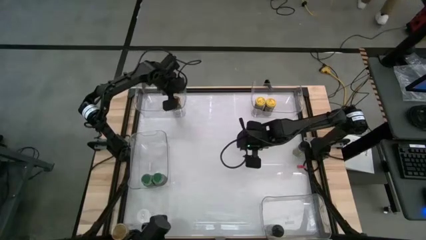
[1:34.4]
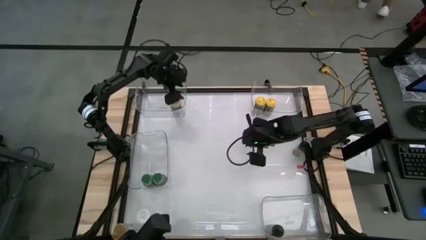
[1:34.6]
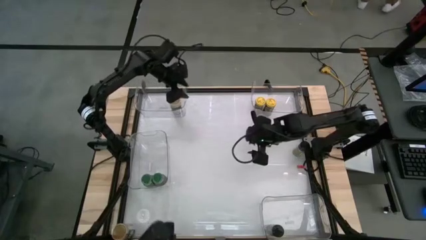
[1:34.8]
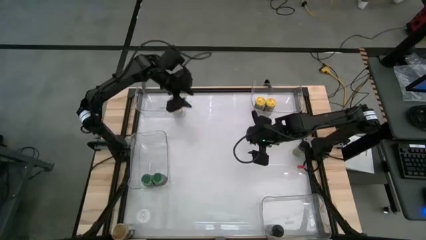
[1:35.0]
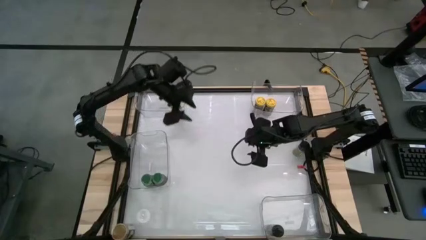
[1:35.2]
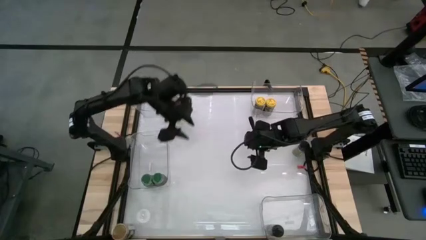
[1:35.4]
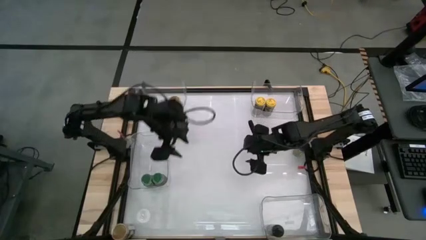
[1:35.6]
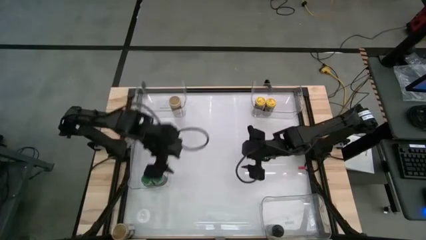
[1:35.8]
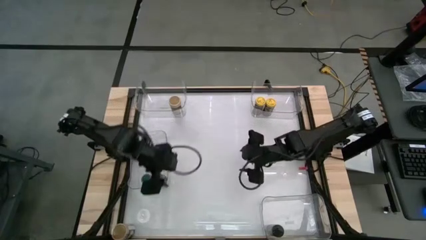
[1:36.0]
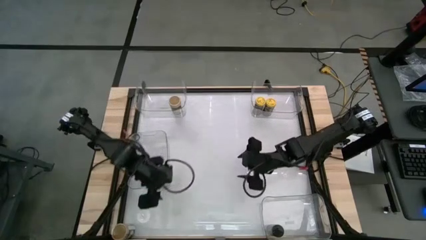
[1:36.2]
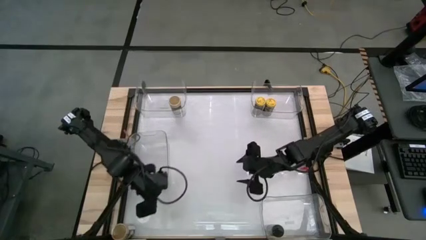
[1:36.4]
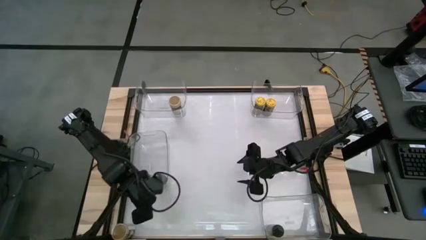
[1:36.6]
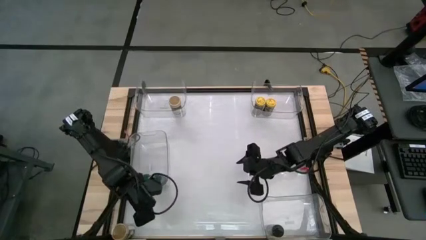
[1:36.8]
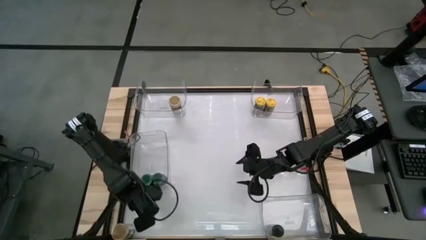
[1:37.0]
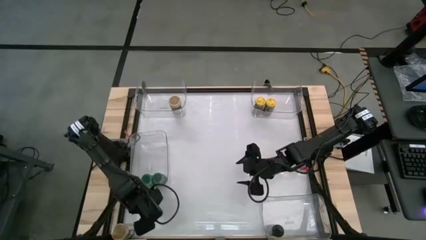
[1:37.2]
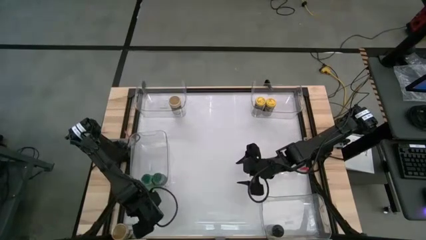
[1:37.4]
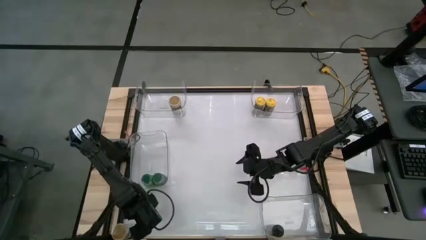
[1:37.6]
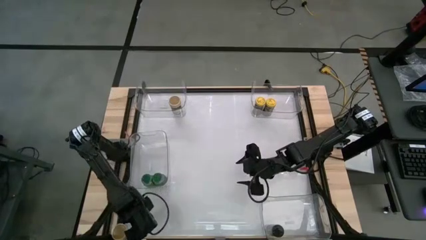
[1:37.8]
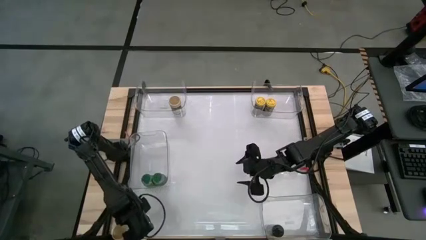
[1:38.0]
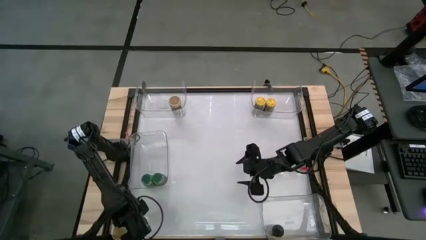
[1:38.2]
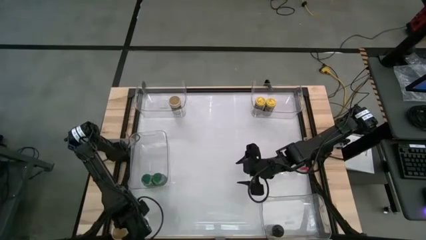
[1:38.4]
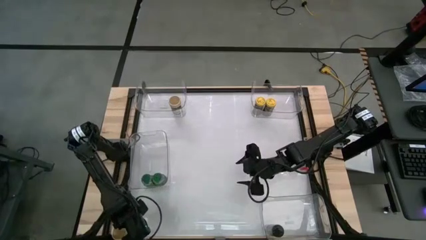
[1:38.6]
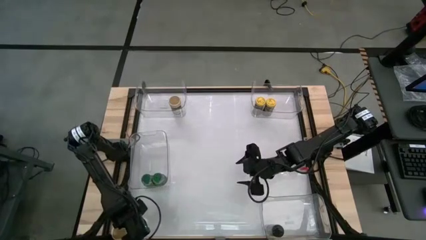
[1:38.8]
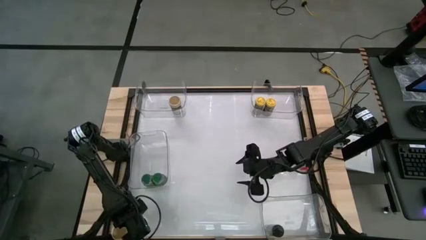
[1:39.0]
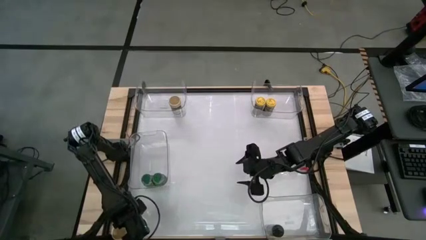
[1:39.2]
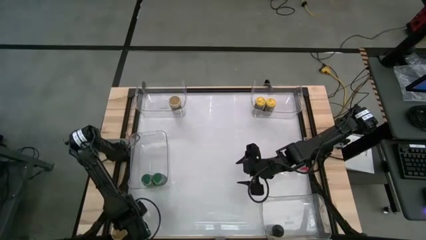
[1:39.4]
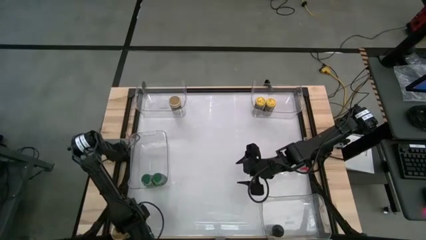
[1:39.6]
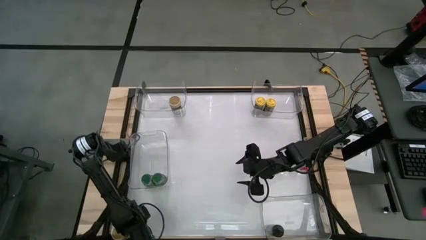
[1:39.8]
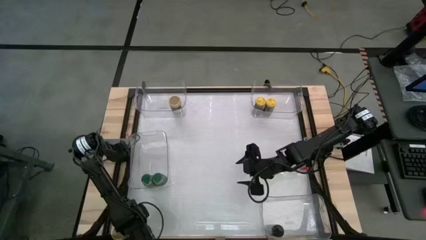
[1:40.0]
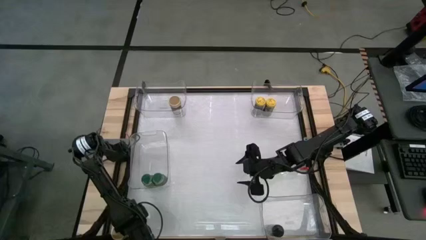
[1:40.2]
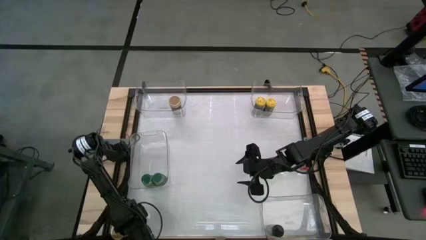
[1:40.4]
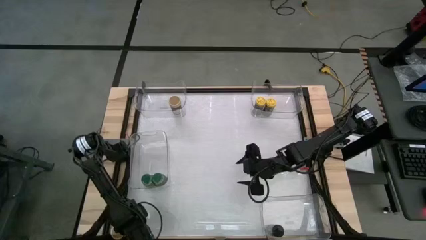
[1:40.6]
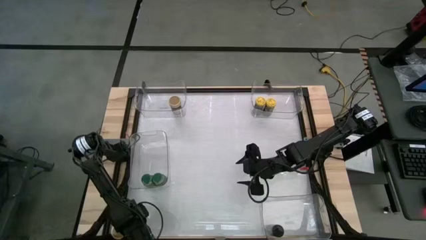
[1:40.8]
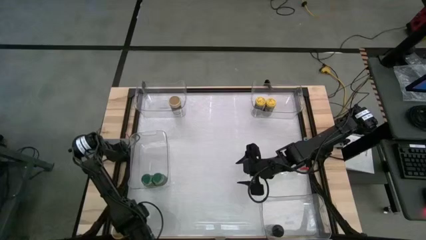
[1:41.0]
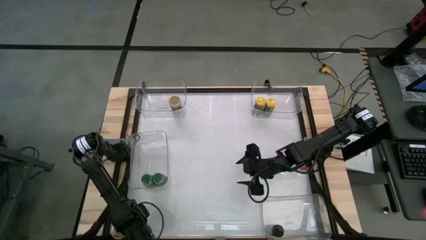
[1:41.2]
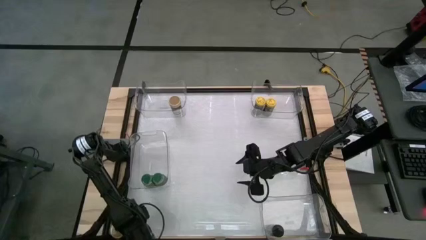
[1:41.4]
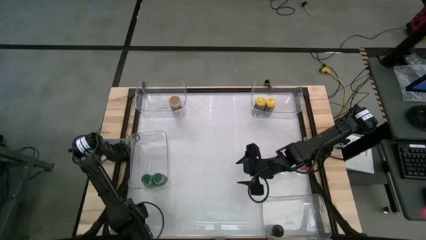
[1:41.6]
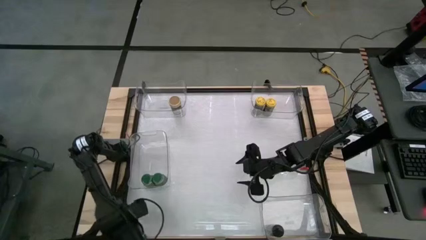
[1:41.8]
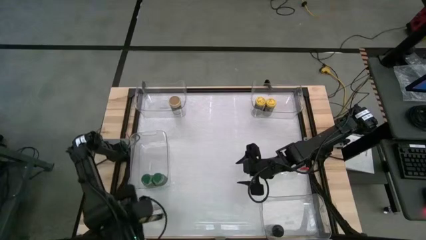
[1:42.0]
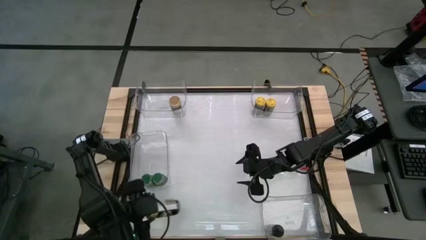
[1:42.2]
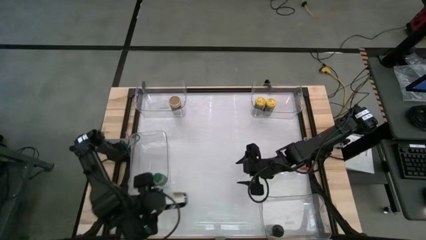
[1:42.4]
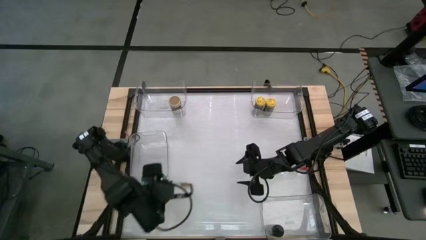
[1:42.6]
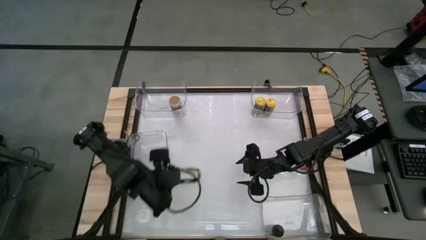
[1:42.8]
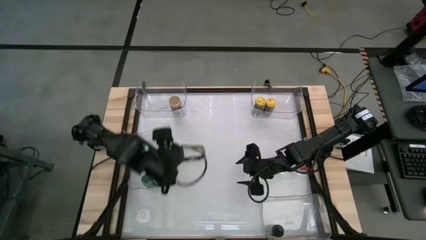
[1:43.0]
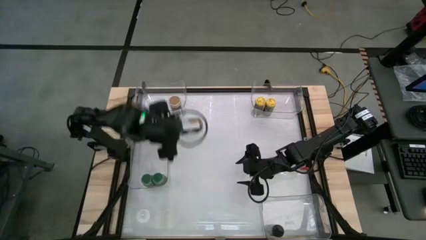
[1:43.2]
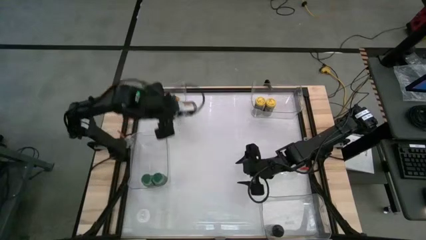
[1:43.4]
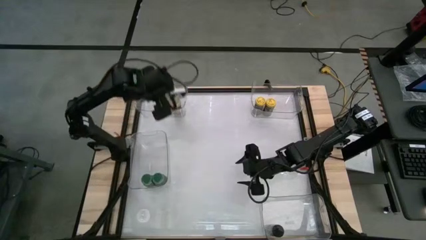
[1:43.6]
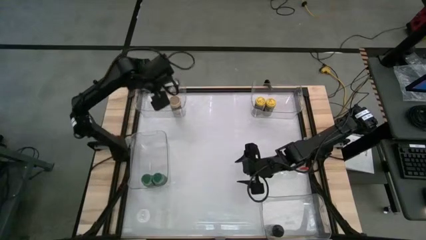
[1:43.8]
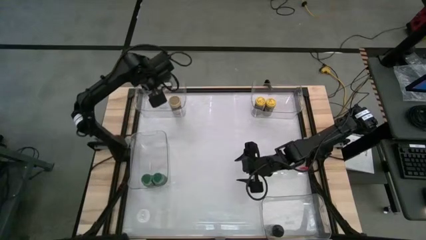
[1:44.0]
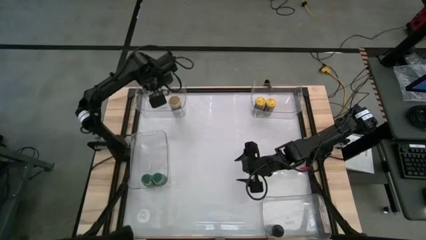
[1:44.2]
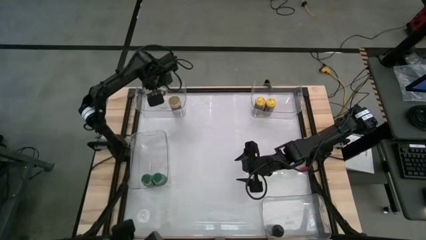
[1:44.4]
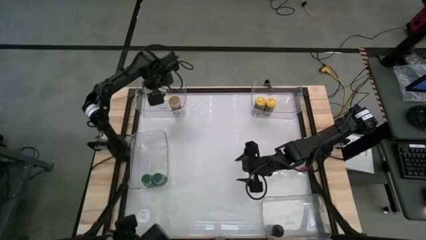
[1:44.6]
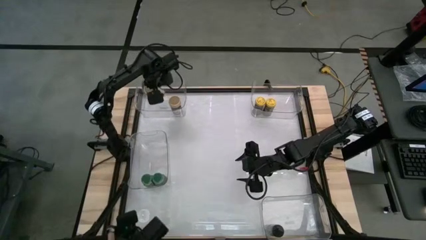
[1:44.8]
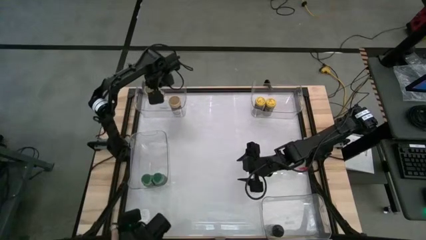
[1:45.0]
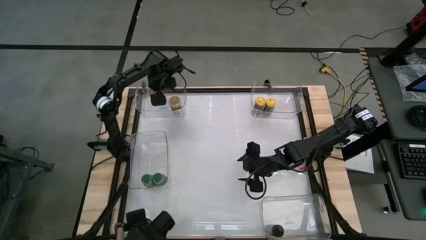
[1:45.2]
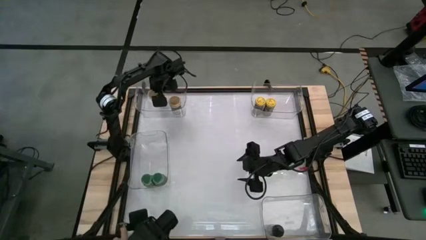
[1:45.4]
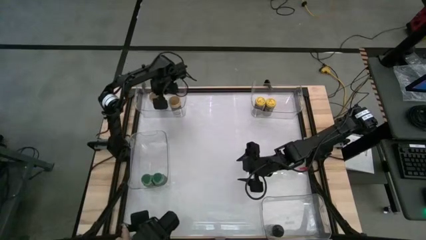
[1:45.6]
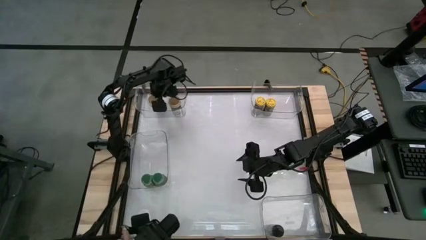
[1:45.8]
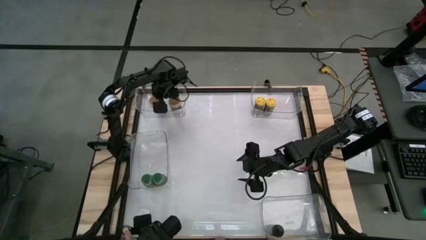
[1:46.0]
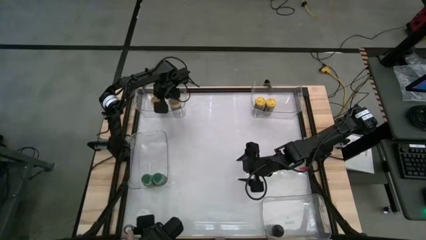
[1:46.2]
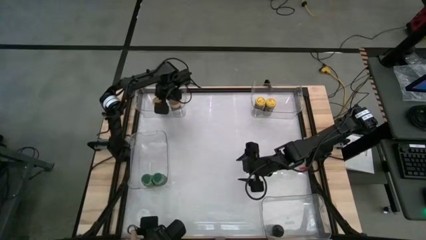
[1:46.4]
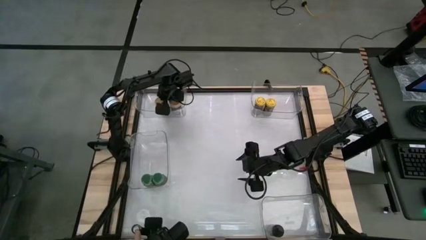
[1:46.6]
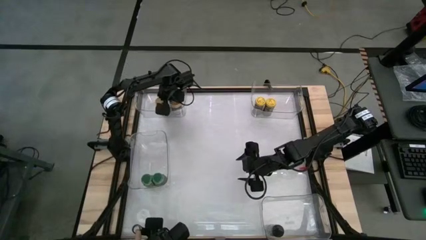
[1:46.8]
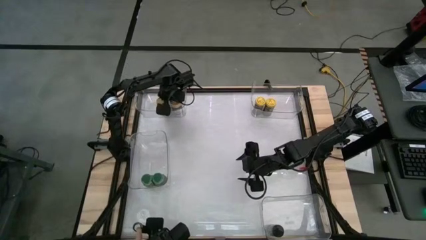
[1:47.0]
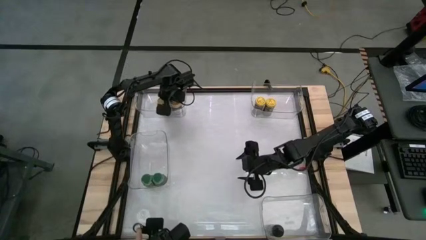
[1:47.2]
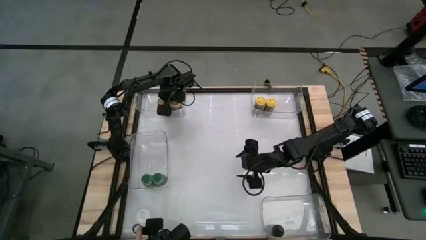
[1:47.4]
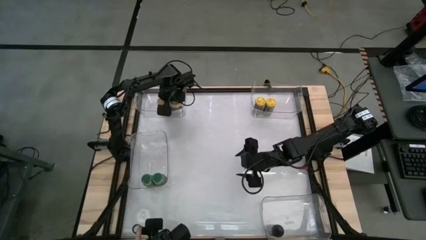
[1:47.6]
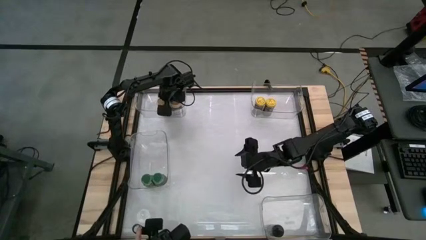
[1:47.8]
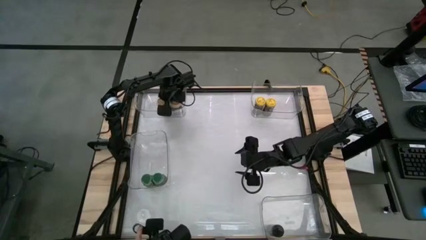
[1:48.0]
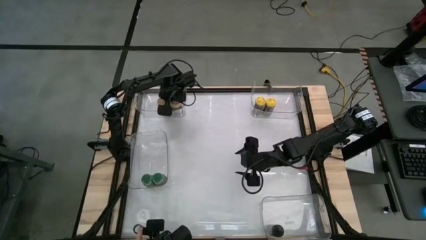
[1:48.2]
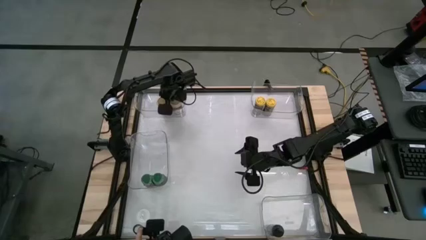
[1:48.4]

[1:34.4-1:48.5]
Task: Sort spices by type
Put the gold seasoning bottle into the top left transparent bin

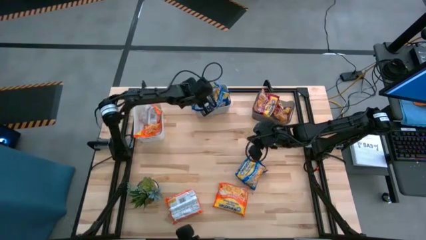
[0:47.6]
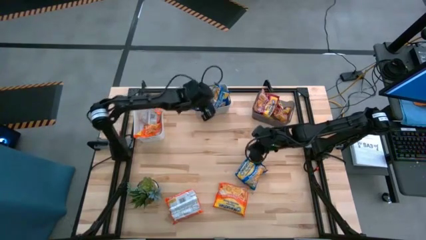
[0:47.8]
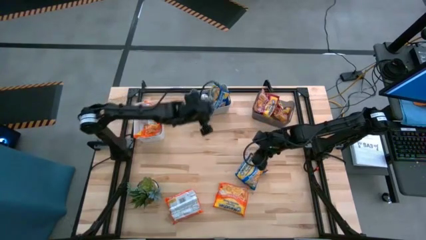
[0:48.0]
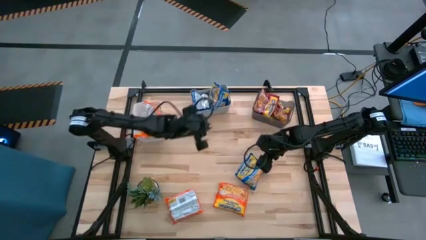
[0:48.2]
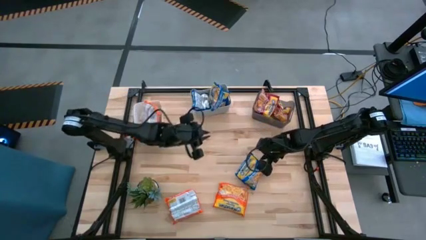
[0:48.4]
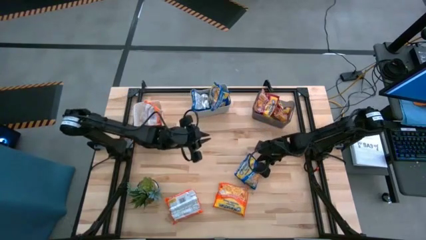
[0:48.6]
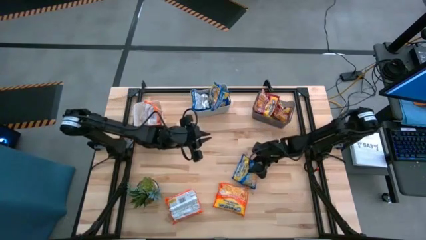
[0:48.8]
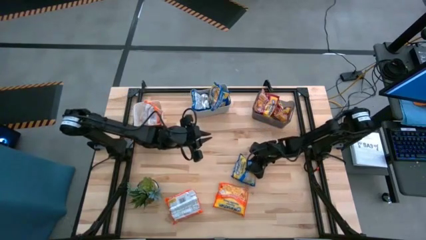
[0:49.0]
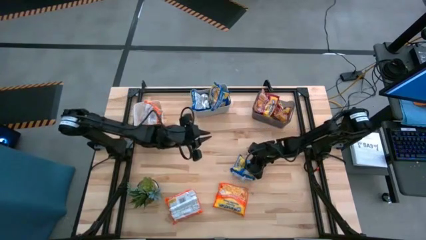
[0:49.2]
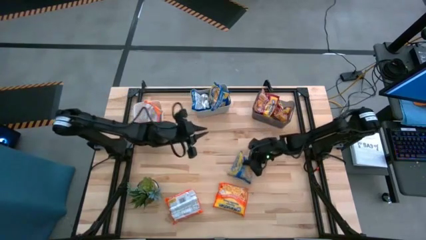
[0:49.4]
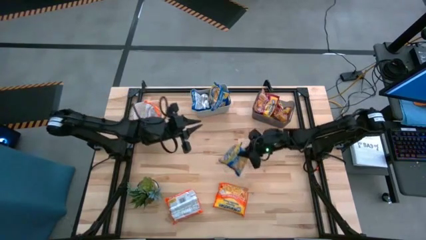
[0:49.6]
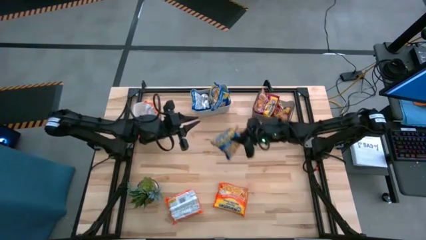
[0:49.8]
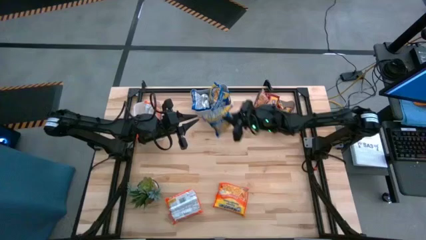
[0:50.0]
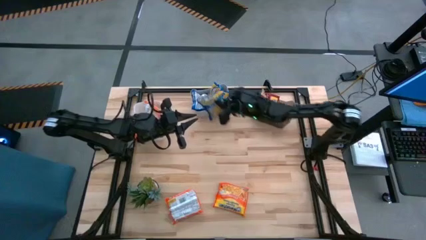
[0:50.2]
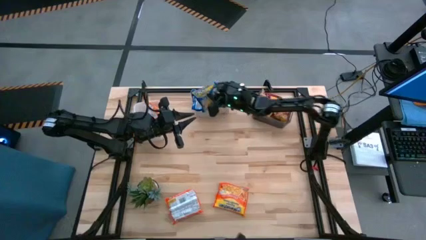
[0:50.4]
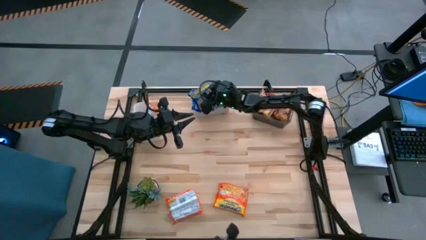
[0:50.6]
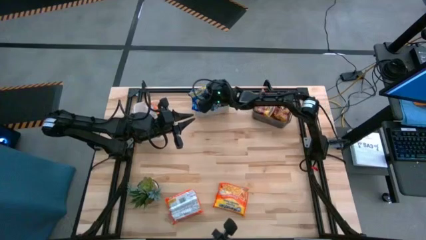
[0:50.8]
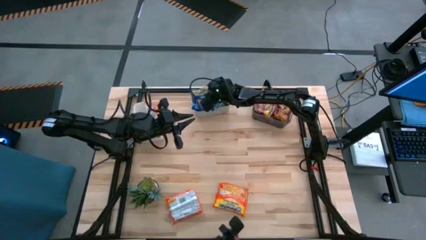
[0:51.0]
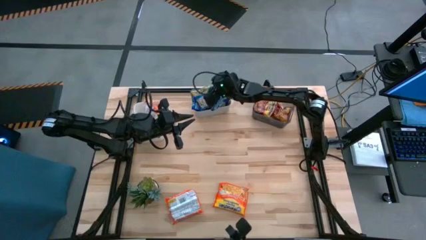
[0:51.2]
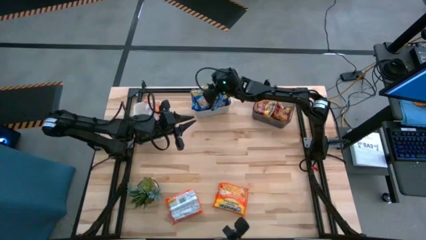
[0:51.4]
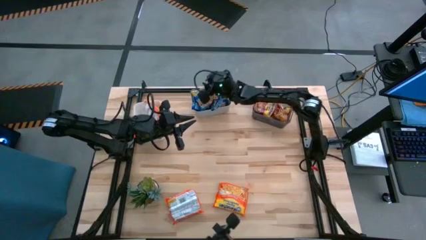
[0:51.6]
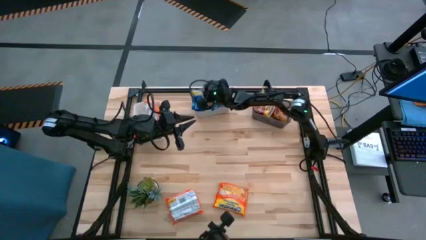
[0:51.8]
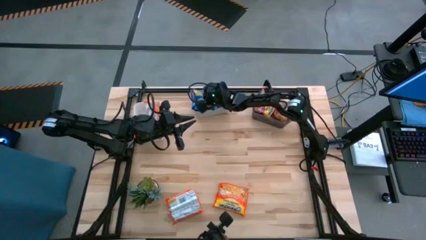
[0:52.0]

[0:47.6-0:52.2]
Task: Sort Maruchan noodles
Put the blue noodle pack into the gray bin
